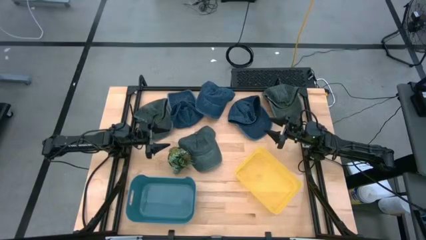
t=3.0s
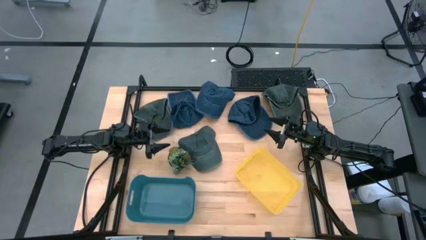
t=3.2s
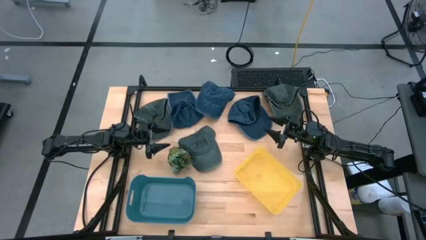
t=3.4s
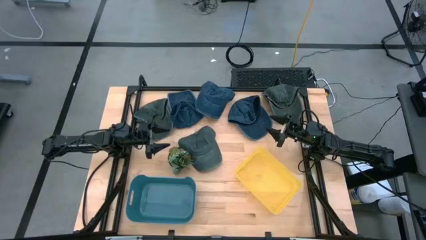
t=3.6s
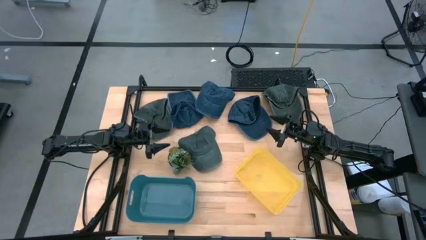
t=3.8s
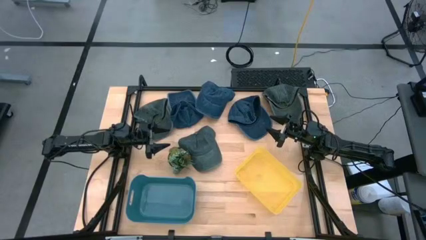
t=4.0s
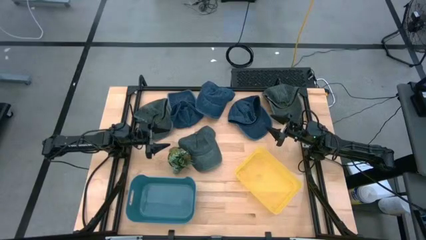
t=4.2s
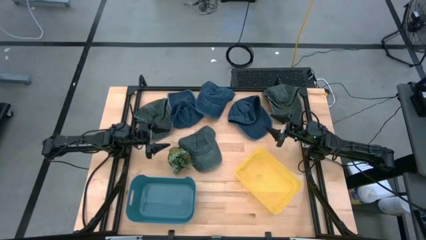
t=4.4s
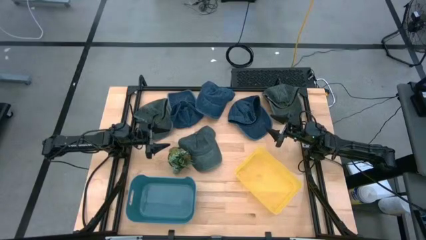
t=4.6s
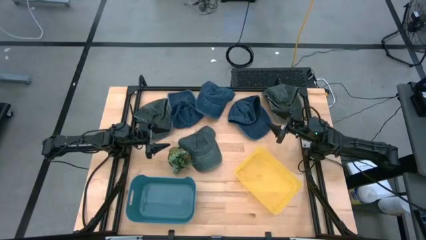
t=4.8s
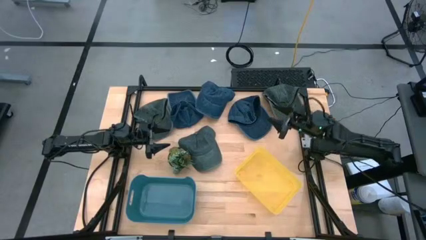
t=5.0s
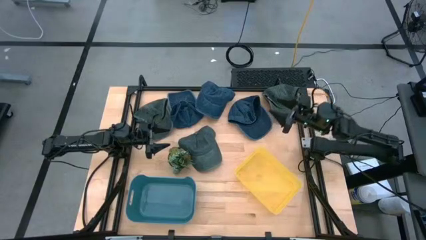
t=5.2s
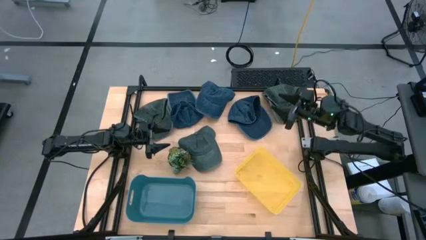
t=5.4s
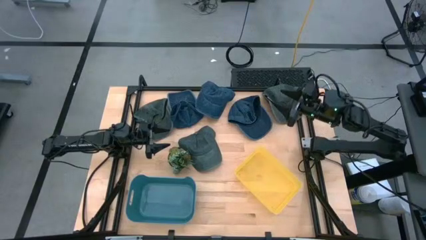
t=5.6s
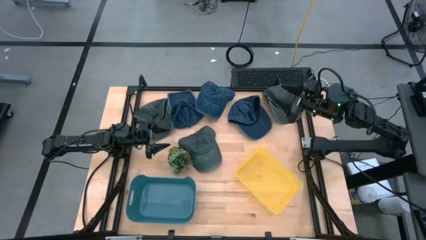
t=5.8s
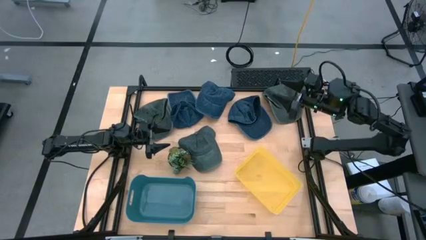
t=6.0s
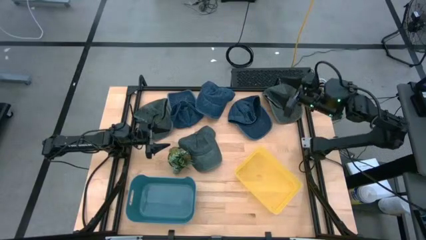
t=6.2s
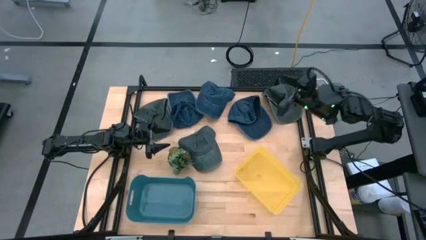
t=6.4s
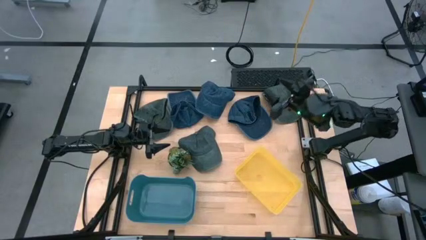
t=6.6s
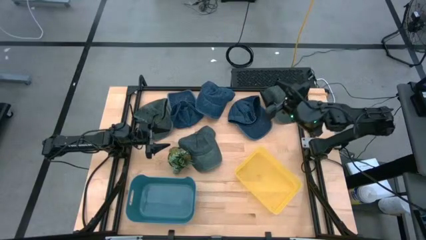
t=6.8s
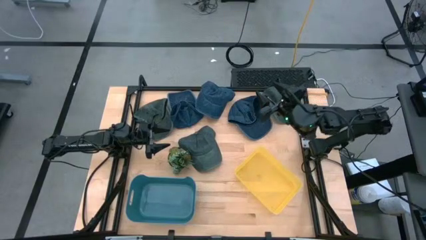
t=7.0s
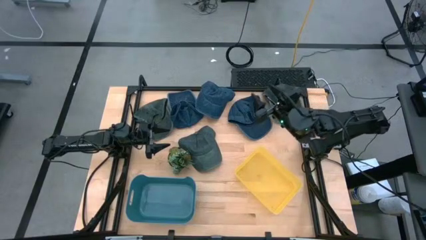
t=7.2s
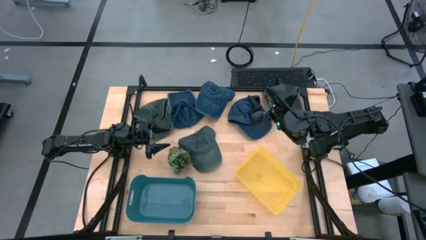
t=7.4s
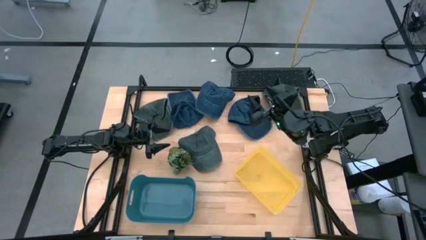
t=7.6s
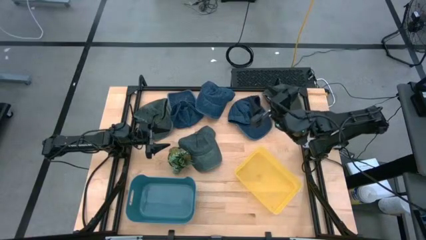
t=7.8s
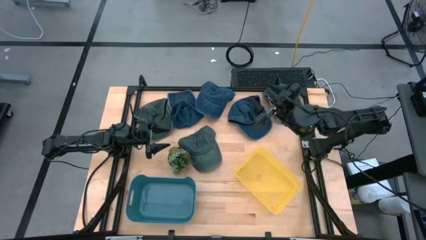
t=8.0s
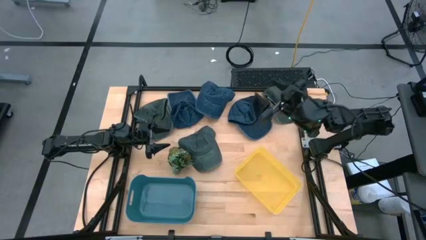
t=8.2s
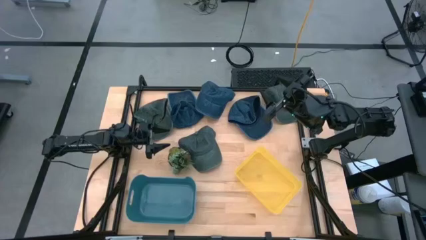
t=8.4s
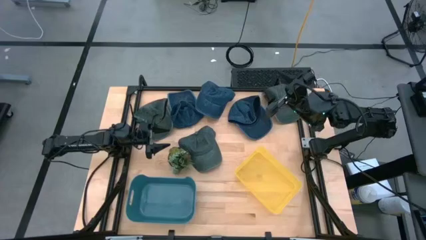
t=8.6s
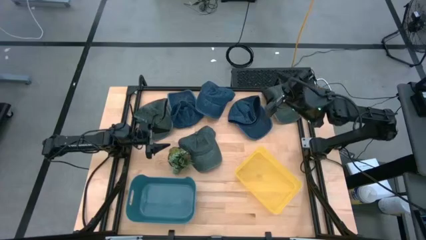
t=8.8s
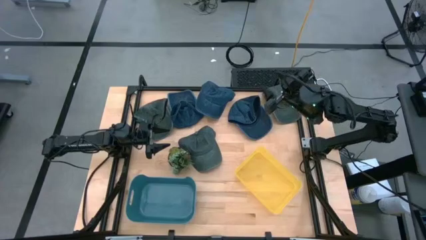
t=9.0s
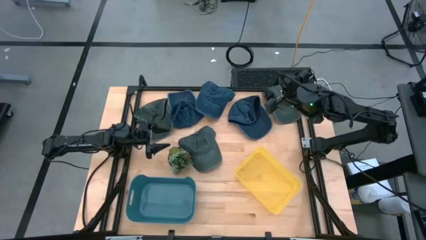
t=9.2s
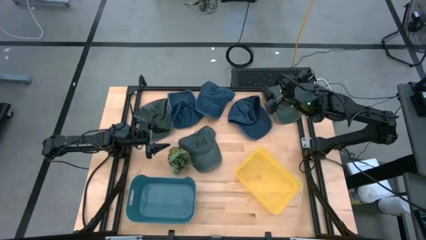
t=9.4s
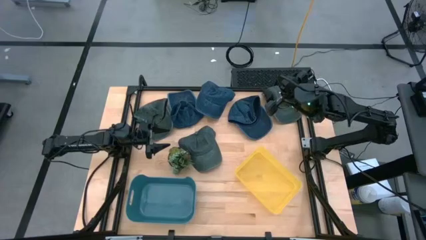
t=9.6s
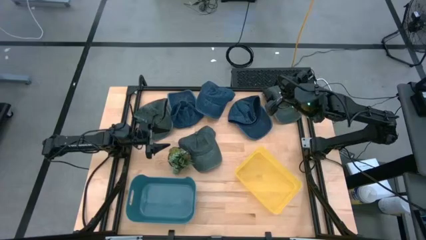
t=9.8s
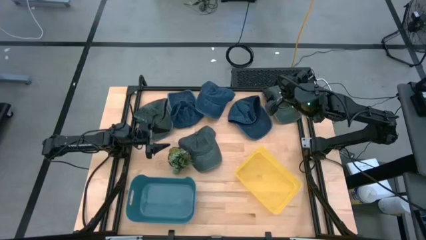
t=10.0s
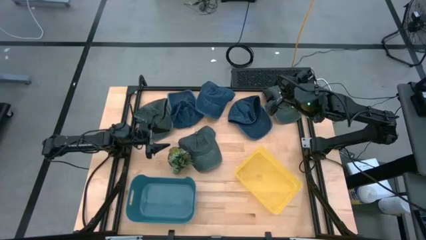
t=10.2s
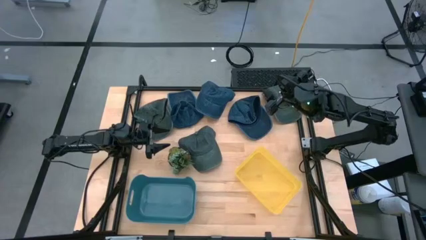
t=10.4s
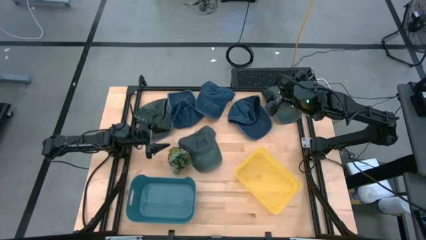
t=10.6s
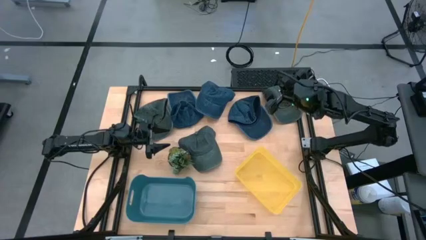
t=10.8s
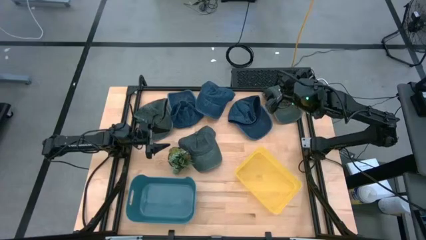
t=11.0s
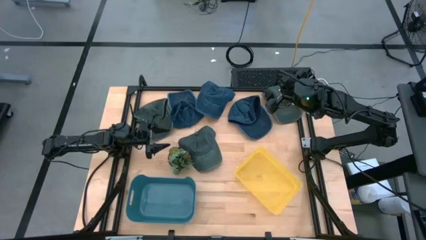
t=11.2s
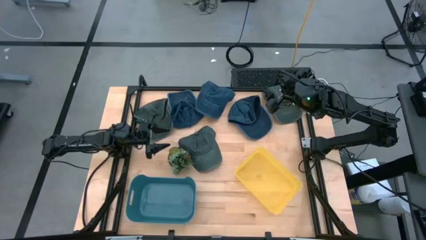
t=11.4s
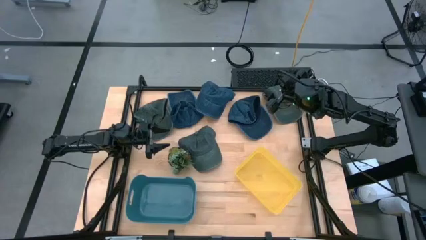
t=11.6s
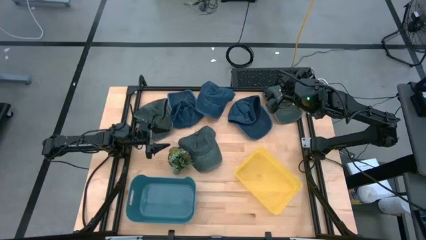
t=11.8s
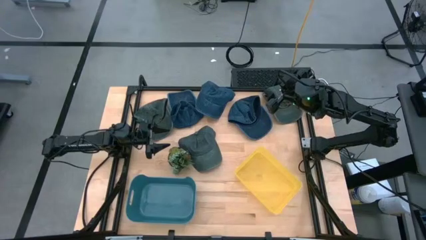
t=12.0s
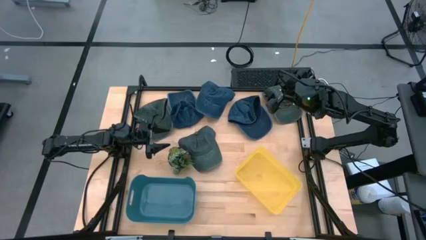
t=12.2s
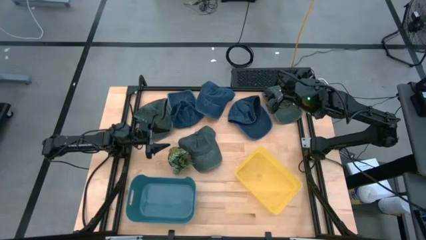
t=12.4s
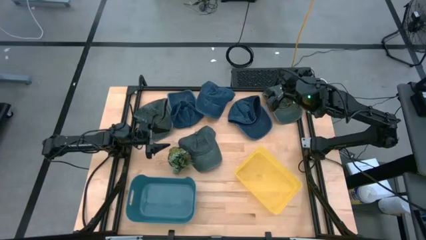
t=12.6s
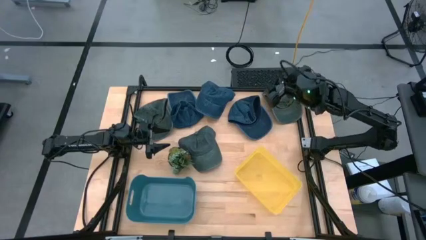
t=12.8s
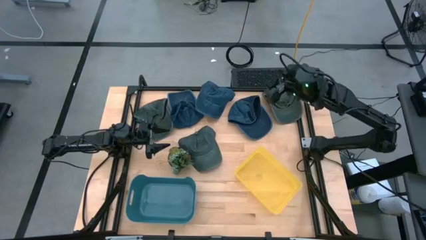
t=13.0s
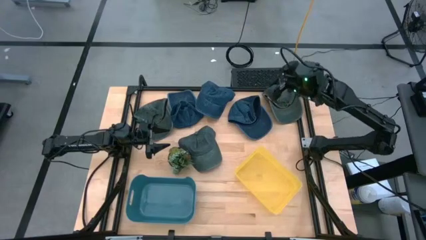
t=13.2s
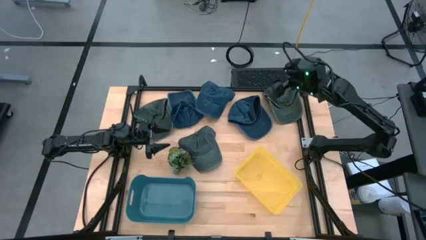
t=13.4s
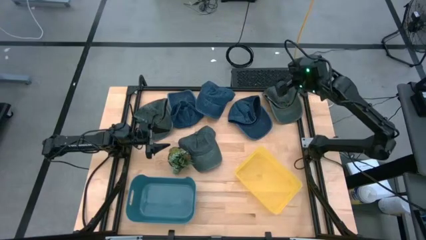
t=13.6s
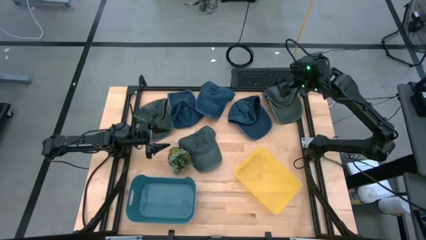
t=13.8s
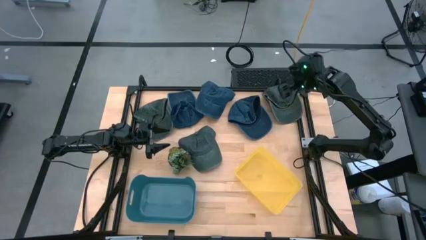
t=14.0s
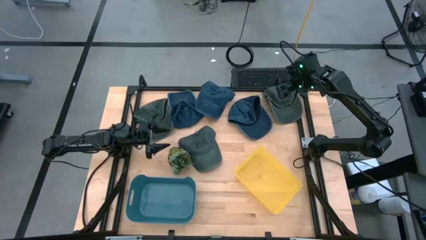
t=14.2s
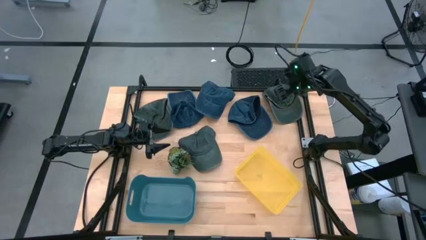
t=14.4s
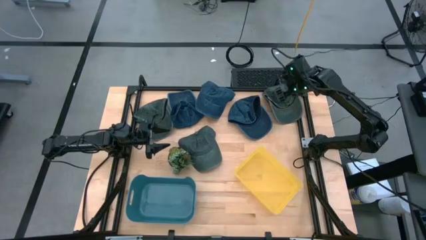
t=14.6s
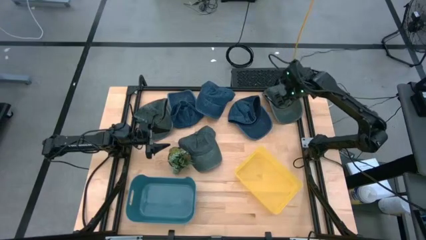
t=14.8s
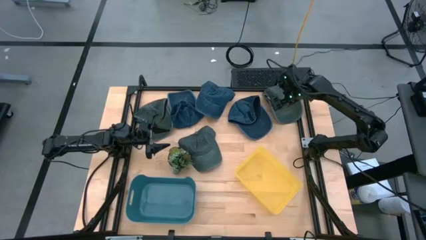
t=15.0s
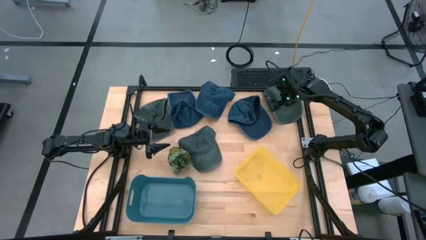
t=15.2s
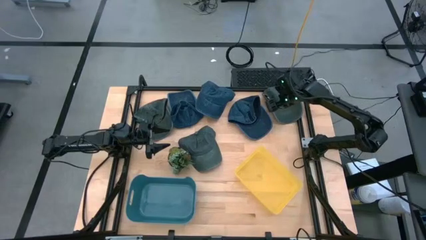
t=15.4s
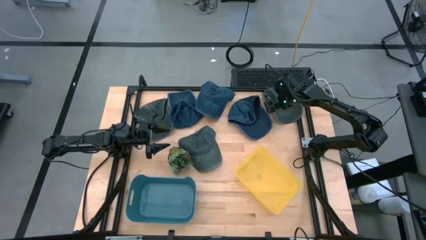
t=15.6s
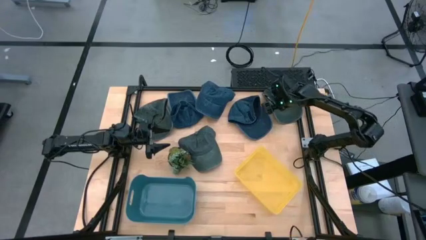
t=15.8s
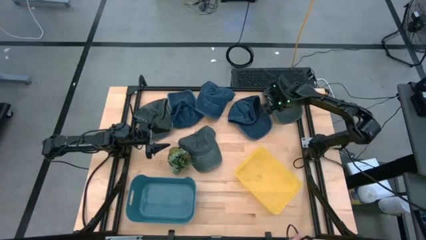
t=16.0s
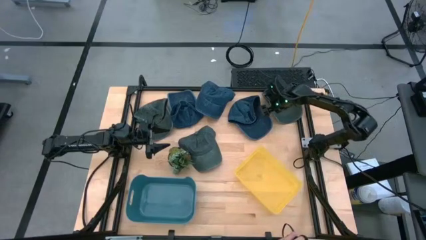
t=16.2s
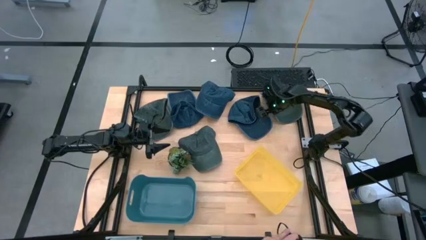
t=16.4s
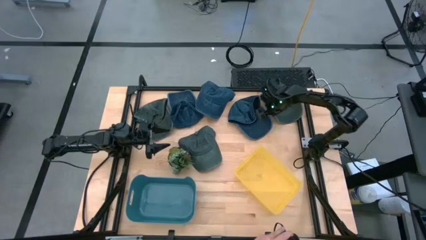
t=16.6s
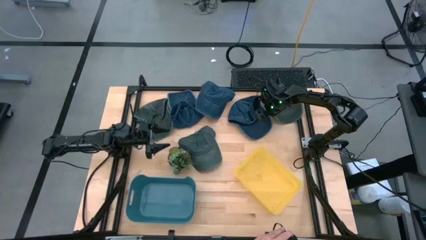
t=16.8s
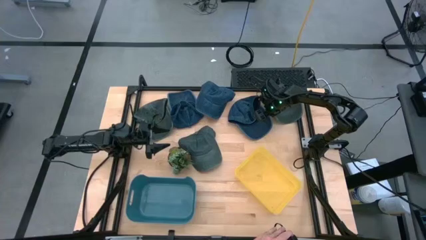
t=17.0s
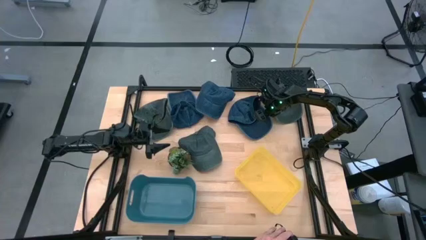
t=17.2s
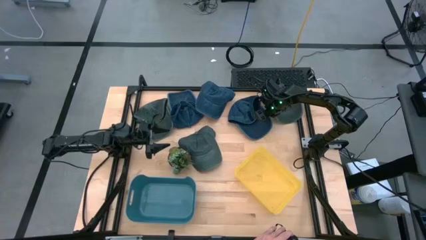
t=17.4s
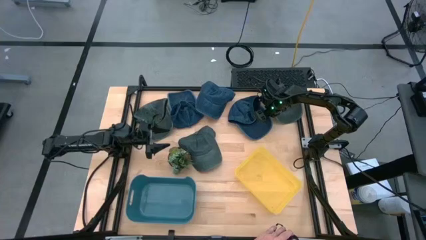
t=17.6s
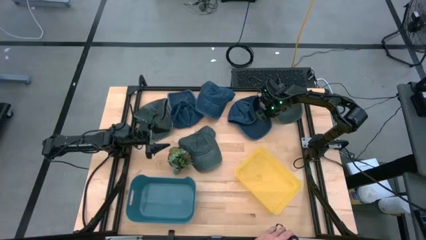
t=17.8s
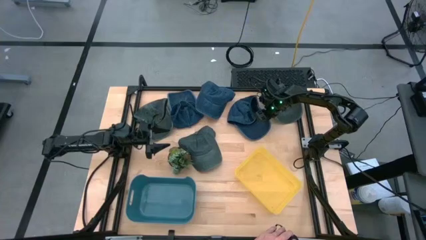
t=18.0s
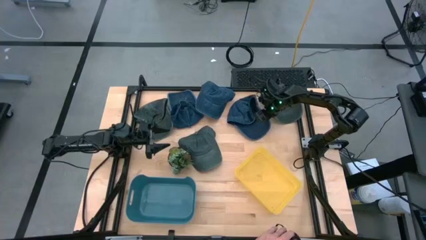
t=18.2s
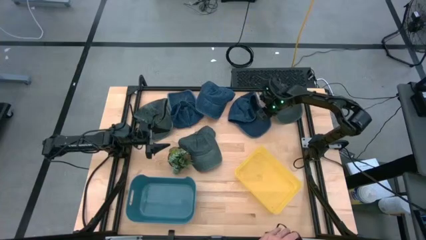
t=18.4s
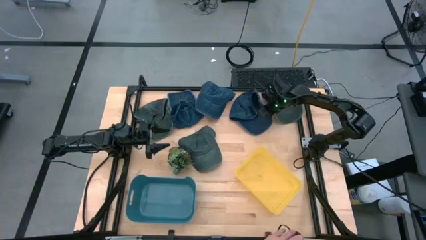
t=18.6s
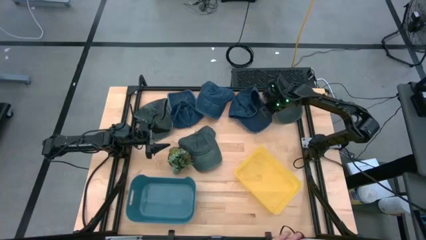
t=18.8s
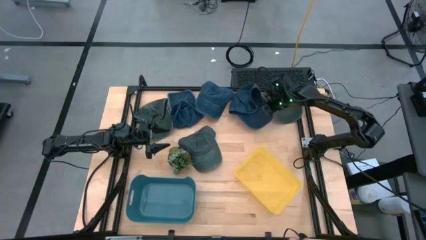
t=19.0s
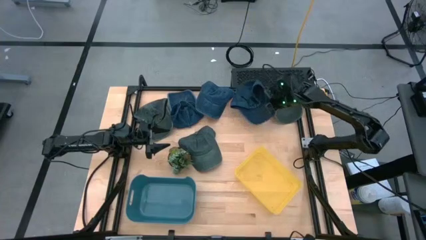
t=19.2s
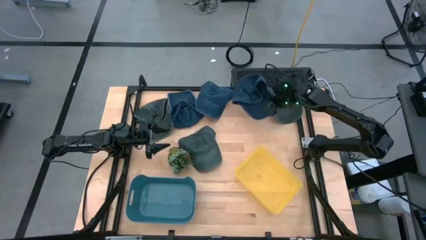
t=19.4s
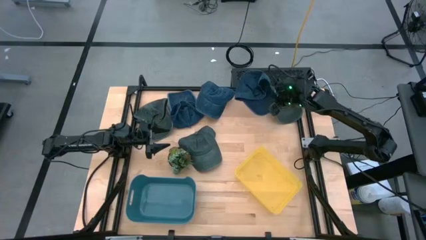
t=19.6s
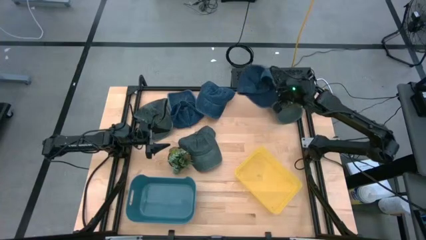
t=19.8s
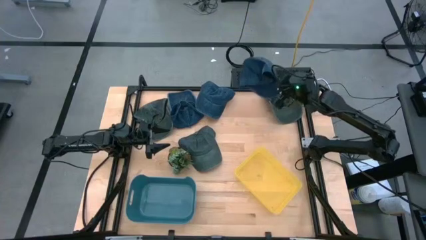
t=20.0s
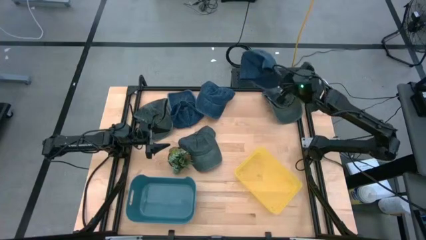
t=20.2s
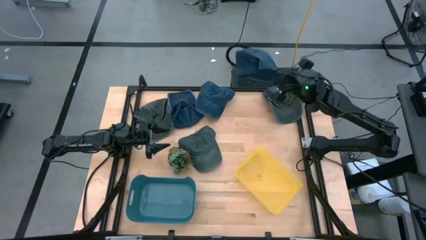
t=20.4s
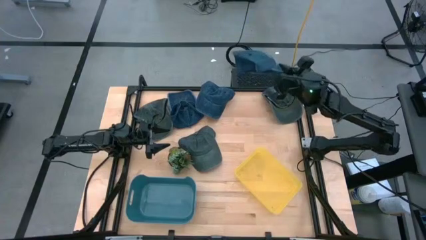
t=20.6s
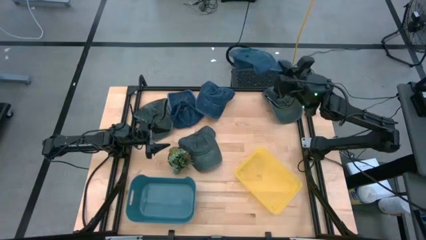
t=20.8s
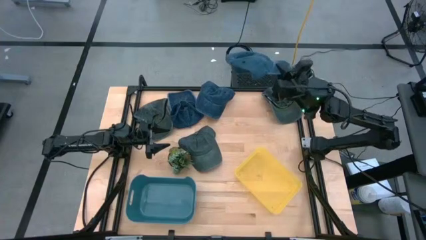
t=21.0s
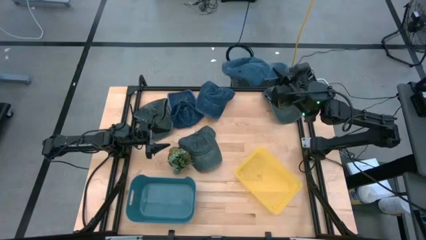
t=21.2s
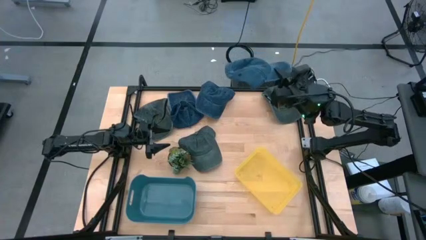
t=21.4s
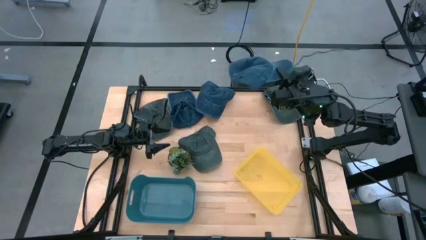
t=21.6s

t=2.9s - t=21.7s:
Task: Pick & Place hat
Put the right blue cap into the blue bin
